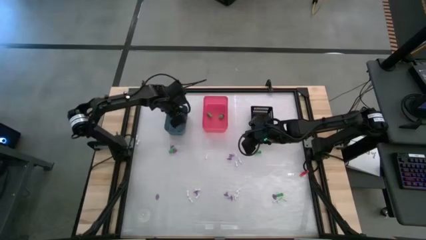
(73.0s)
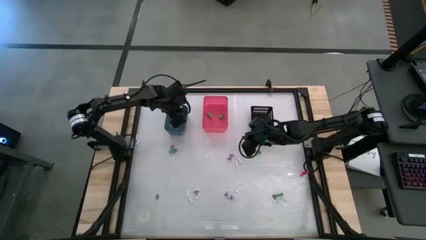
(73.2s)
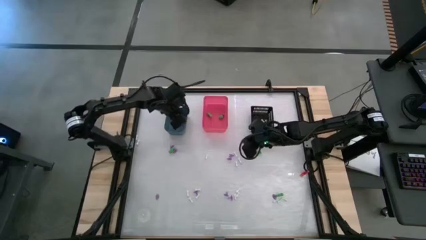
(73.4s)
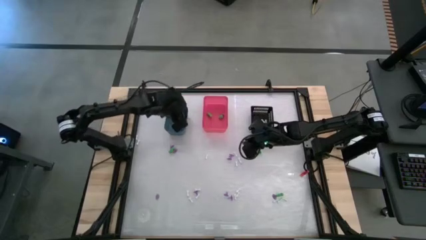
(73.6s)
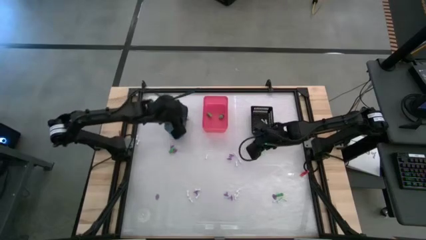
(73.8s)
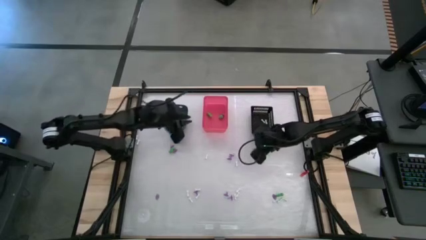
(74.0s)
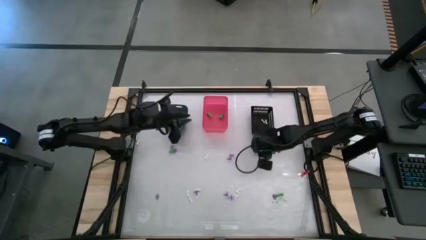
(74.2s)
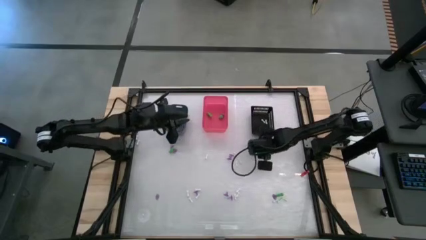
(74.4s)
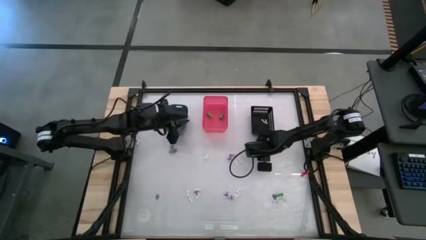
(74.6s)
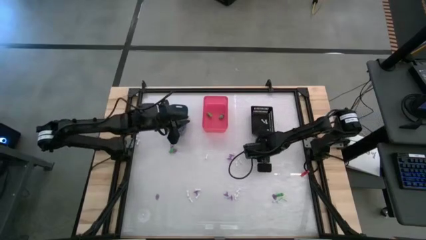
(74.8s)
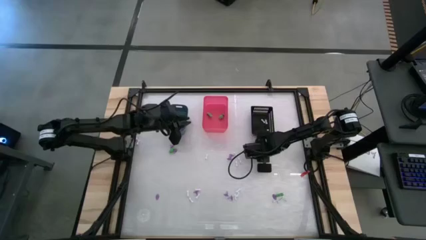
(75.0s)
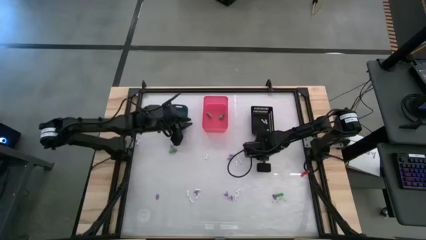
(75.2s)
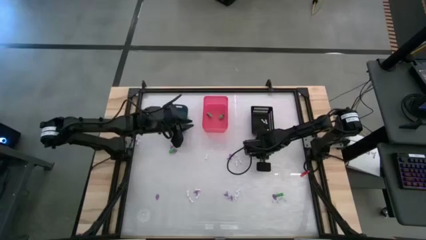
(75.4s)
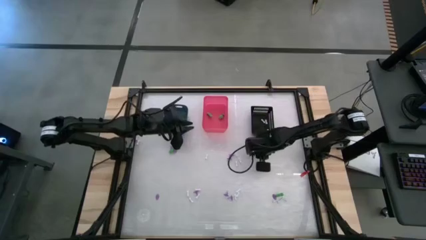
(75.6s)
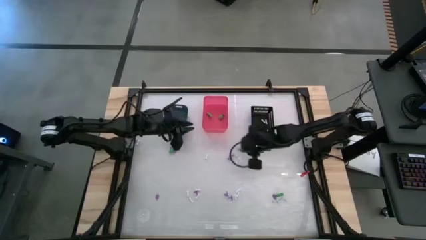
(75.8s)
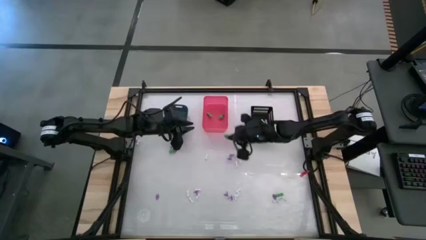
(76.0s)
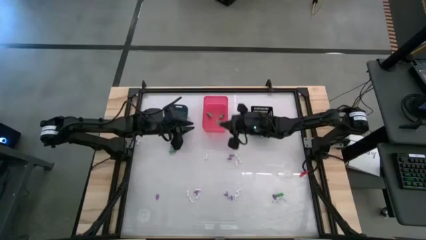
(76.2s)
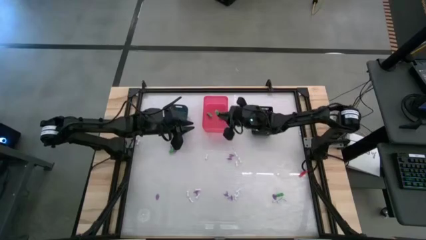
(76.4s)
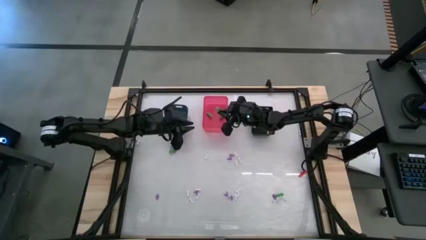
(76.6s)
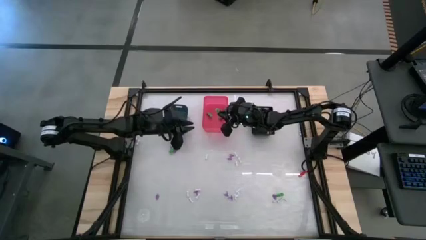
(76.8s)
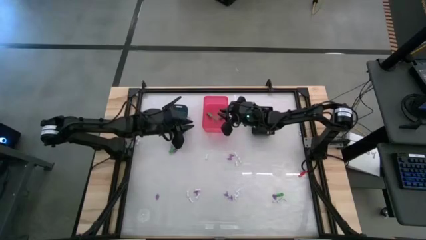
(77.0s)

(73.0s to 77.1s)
Task: Sort Halloween decoration
Put the green skeleton toy into the pink bin

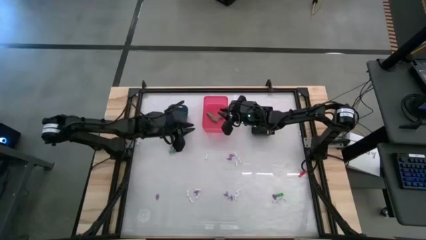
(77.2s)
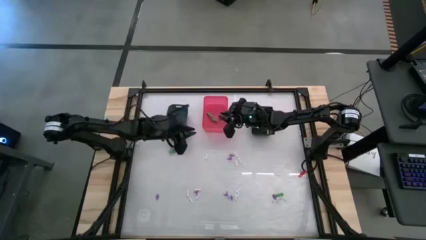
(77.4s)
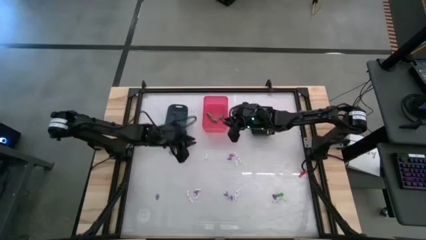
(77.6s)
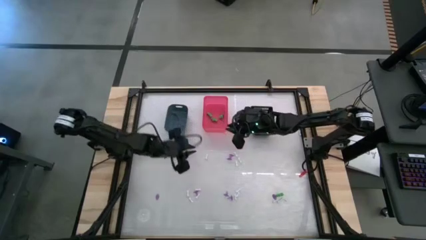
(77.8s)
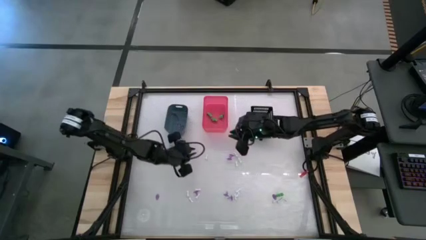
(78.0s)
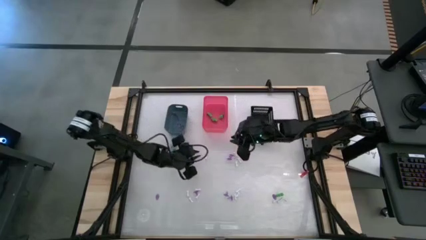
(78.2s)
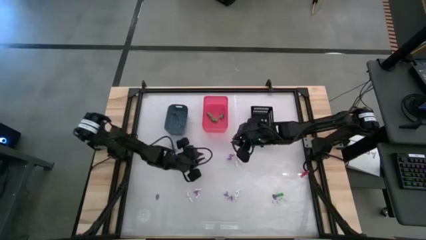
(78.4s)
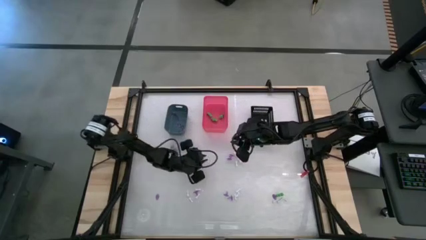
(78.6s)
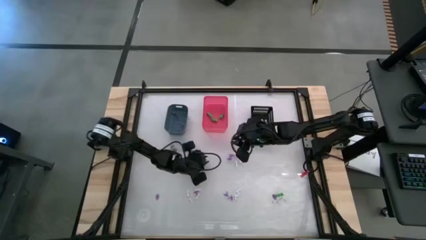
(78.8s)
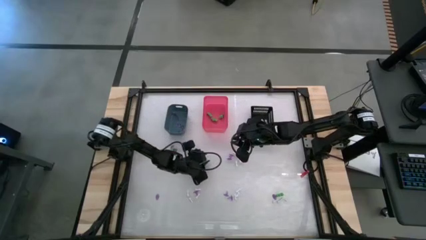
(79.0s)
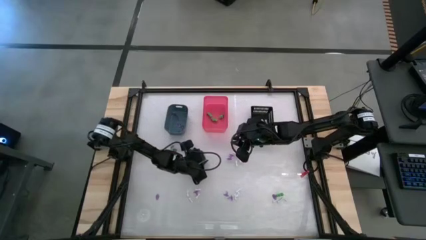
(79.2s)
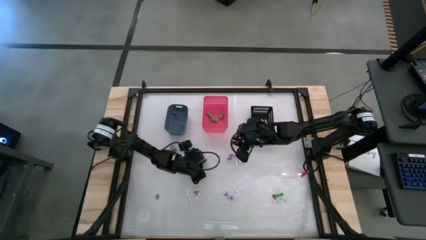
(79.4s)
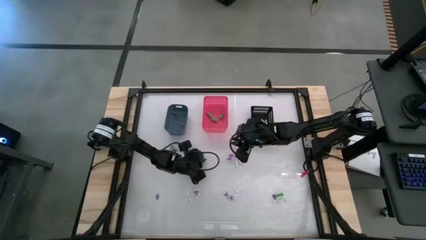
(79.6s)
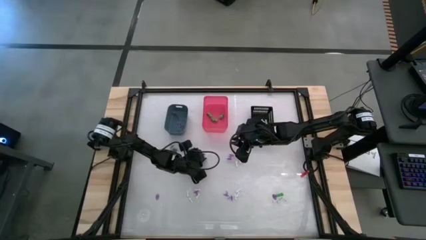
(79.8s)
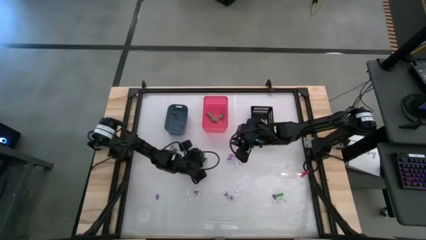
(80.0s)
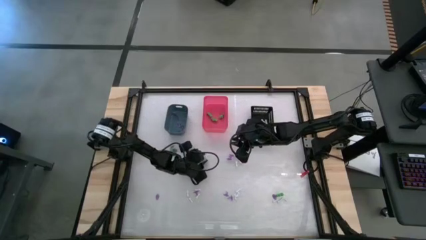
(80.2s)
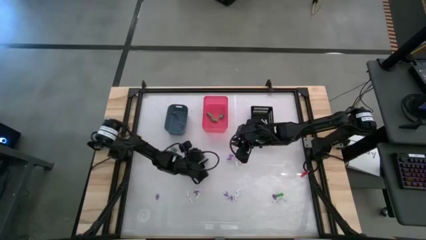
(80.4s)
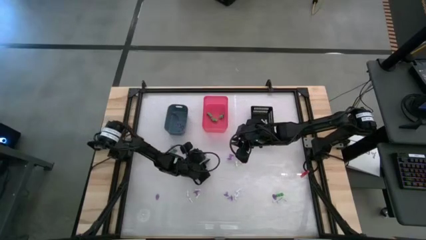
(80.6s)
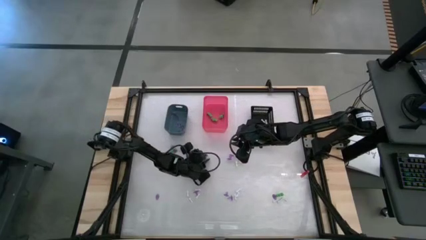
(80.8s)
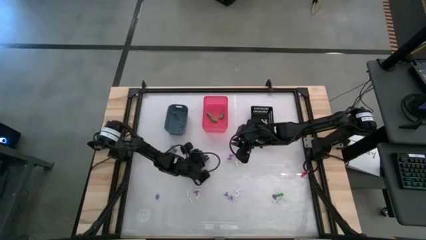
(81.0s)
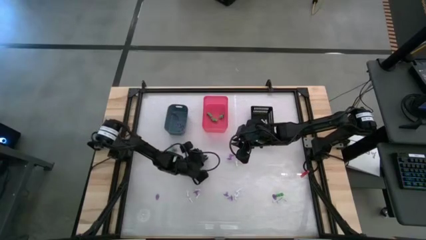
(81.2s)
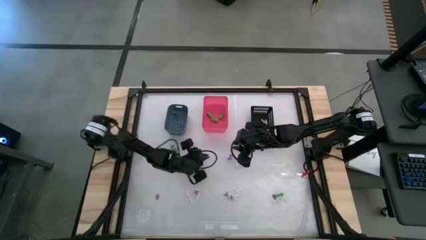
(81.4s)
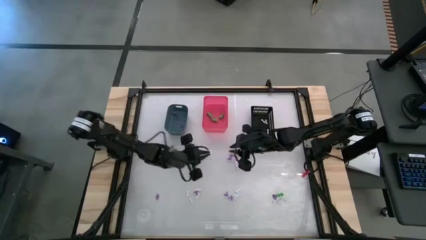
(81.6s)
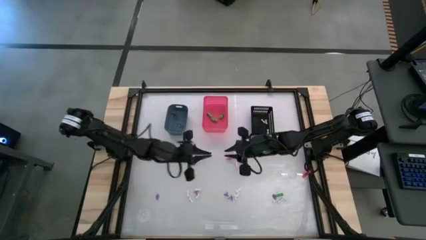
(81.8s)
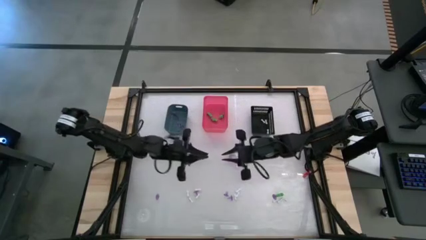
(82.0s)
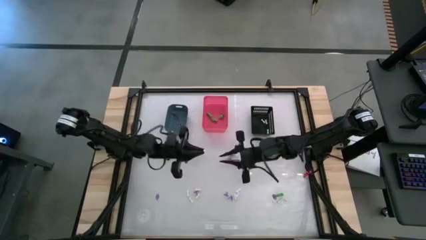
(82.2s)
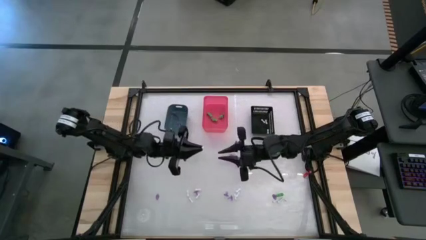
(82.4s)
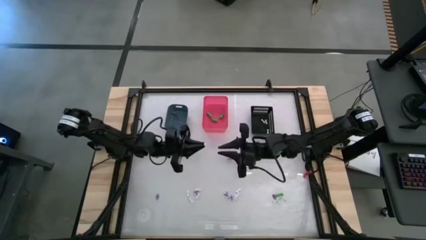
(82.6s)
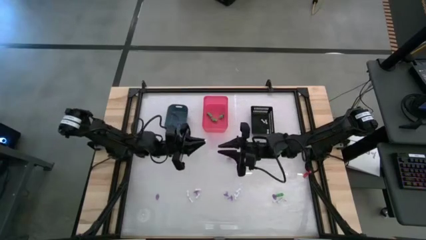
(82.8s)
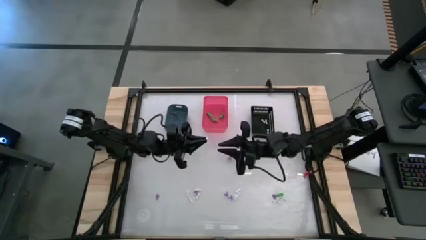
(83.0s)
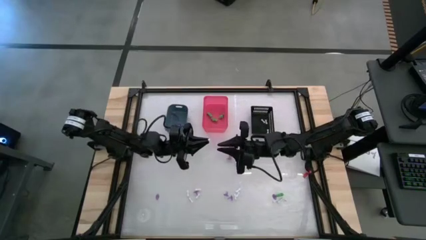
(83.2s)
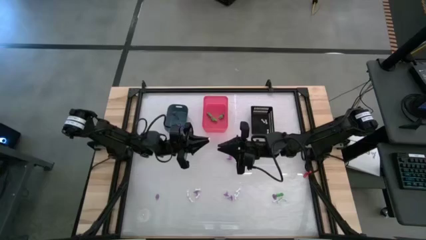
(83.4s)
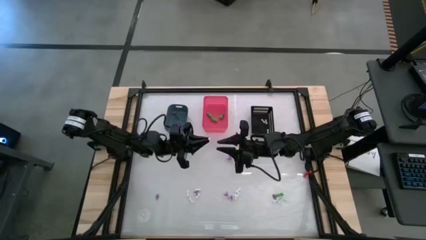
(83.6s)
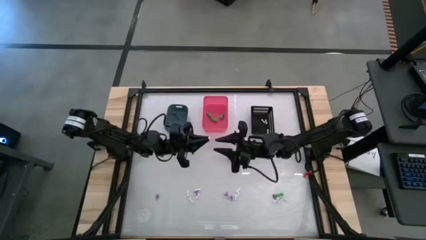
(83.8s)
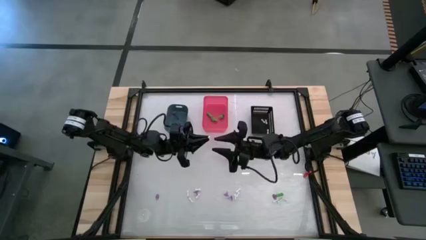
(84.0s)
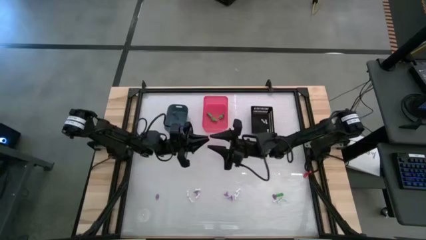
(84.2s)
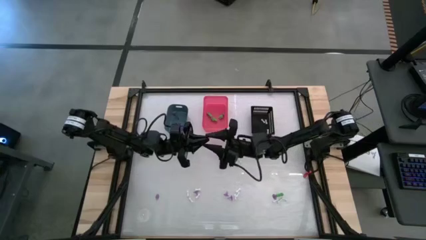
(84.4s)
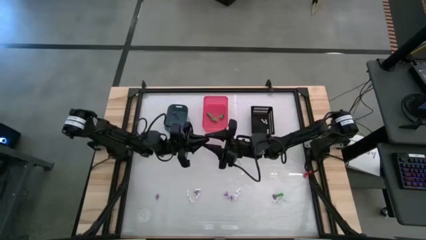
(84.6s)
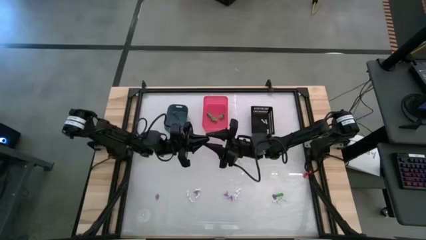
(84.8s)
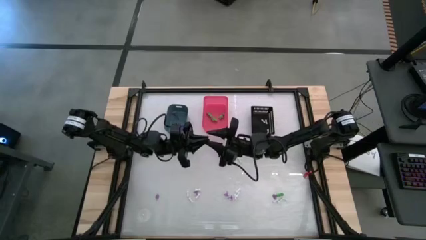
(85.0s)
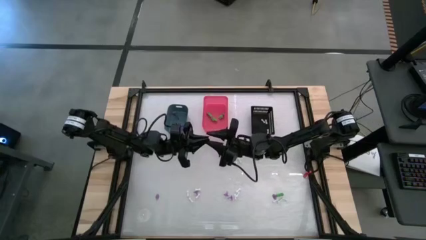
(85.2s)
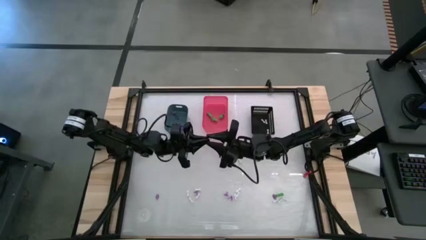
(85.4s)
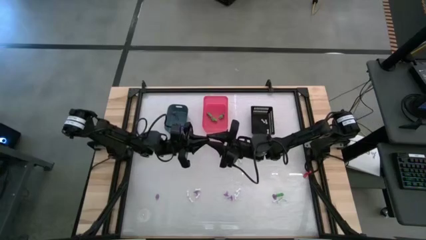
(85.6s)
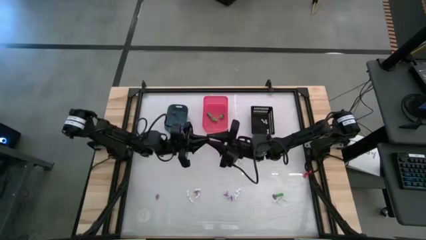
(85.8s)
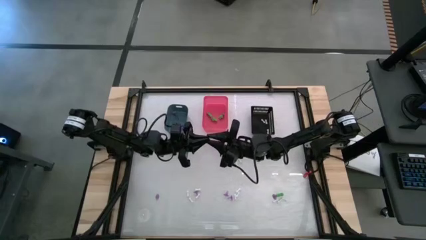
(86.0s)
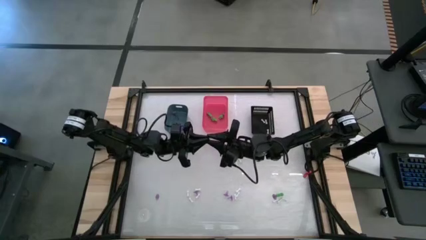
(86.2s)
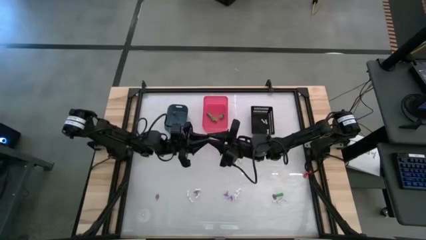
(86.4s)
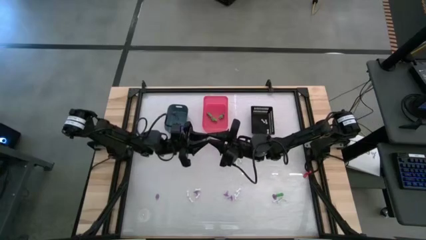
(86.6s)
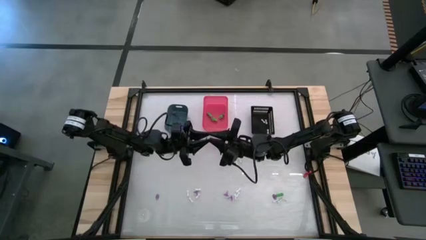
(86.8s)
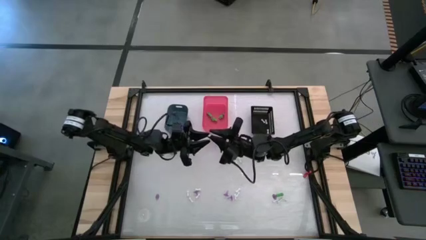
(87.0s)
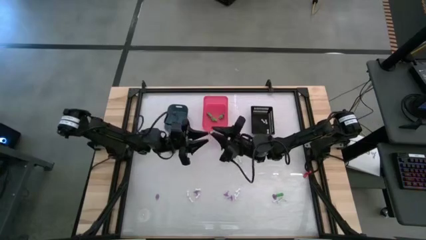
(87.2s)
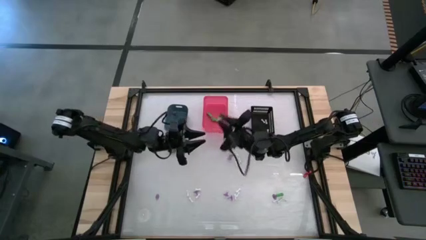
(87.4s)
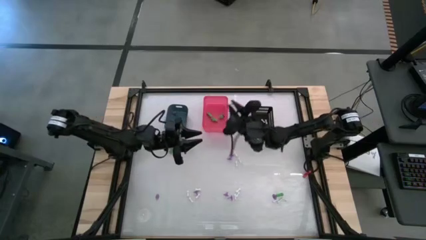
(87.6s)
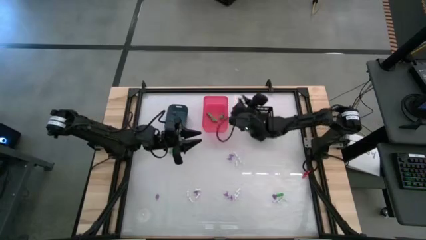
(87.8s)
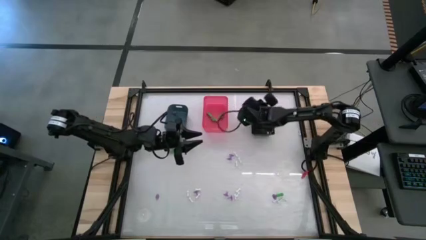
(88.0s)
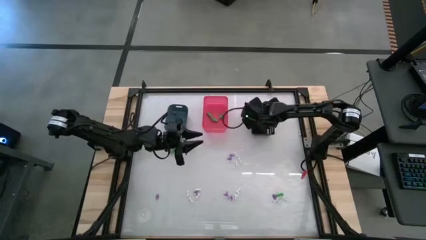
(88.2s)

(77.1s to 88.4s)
Put the white bone toy into the black bin

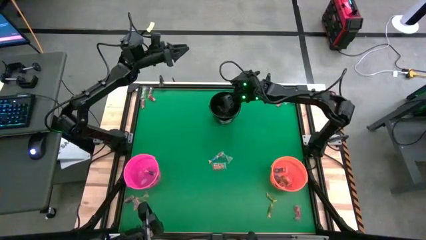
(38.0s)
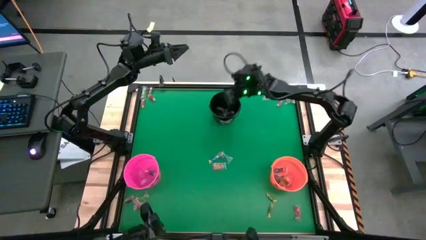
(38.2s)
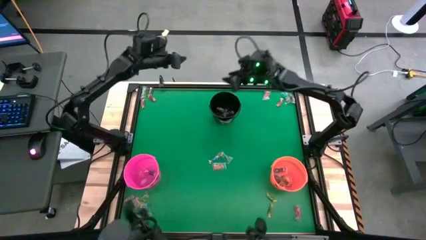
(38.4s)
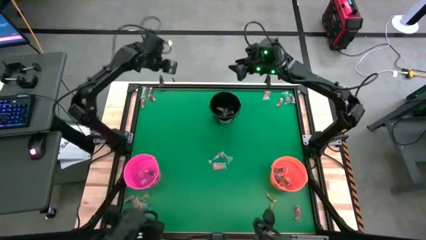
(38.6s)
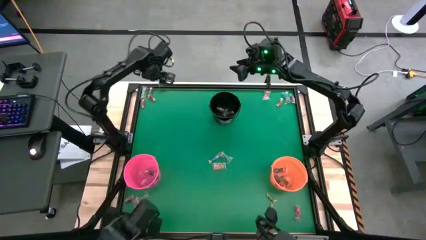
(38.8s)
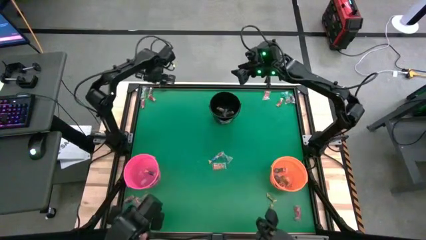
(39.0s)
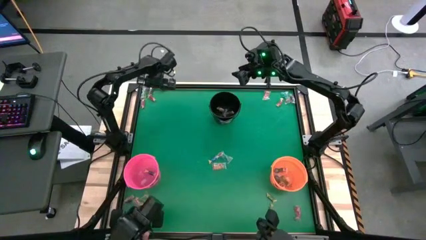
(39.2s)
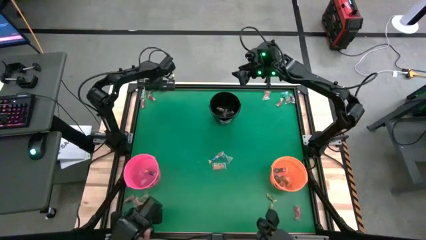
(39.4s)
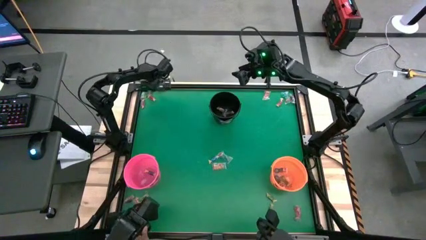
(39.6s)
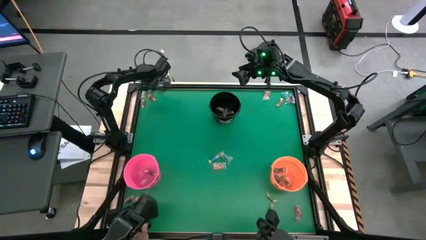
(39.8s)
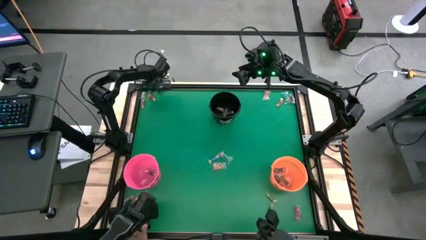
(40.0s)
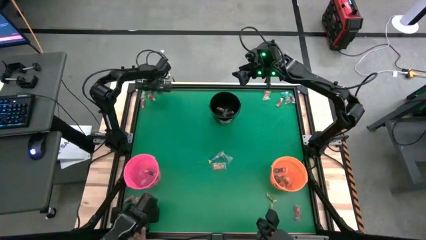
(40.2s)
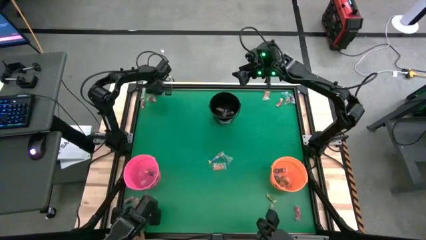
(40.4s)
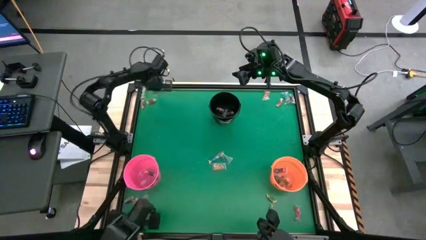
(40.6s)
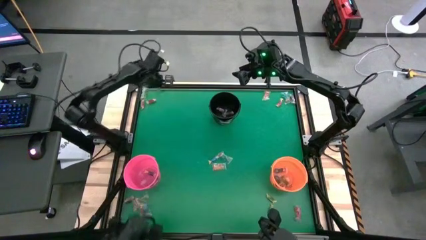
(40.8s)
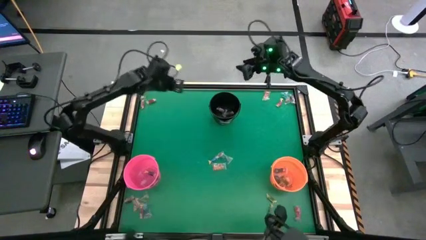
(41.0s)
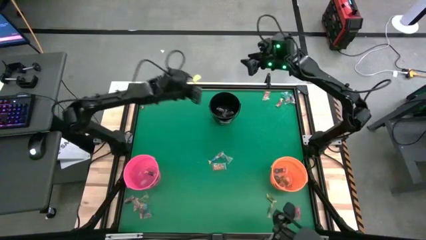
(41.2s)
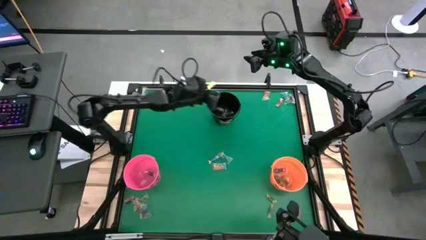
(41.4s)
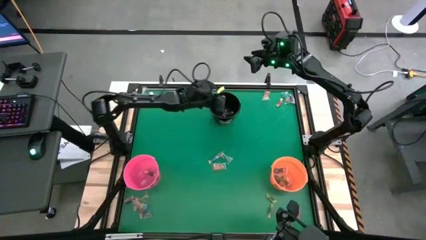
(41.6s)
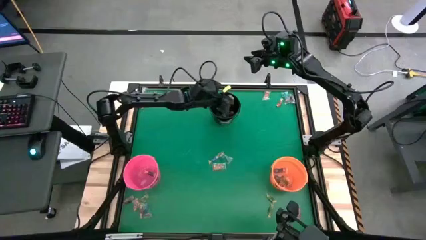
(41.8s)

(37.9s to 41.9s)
Task: Sort candy by brand, put in halloween buckets
Put the violet candy into the black bucket
